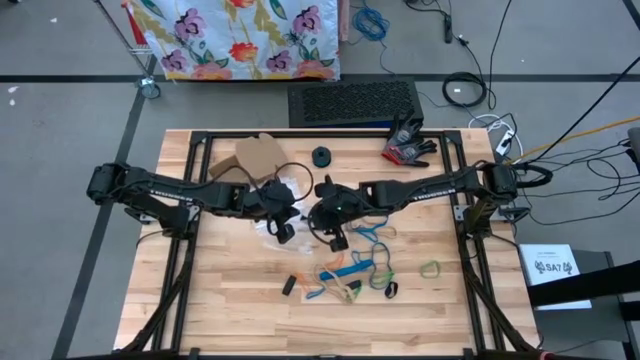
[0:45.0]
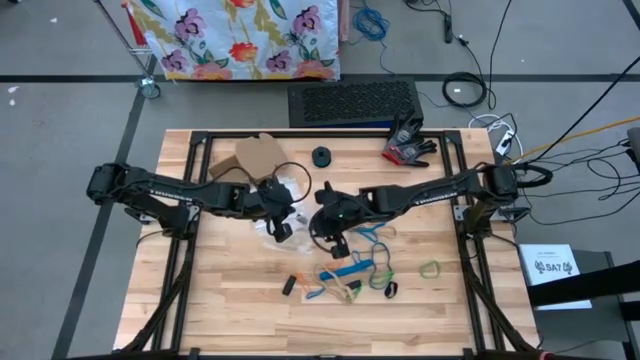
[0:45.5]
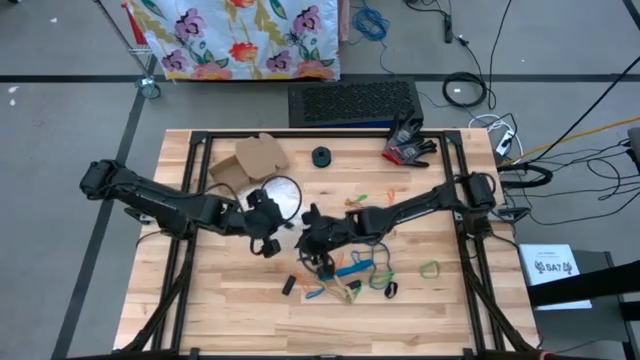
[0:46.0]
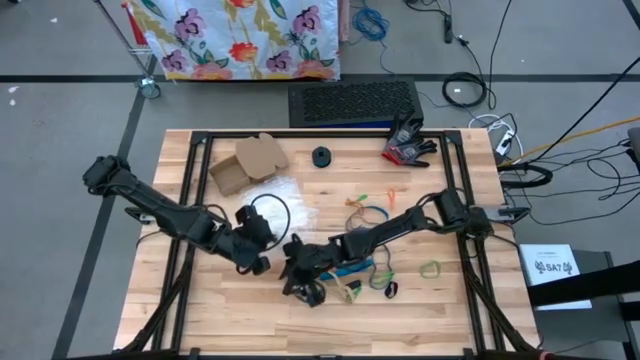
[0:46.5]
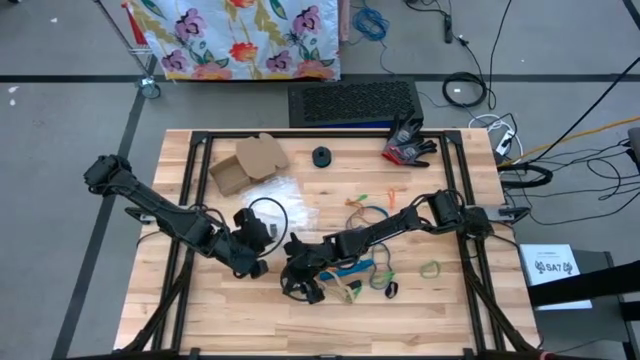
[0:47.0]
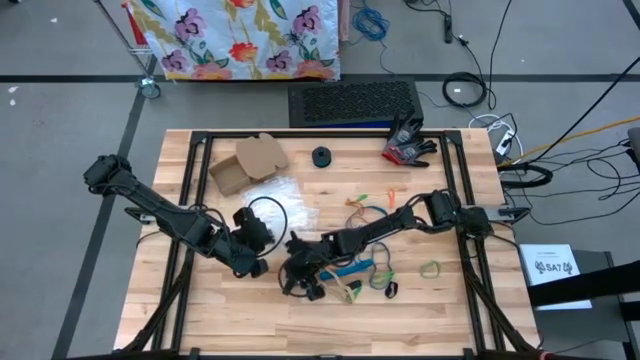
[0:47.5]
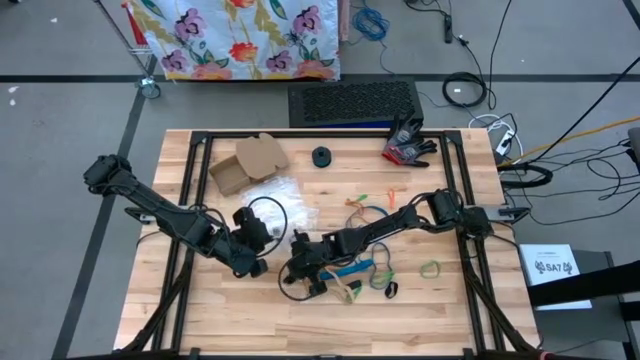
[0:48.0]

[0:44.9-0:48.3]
Task: Sort rubber bands
Put the black rubber band into the transparent zip bag

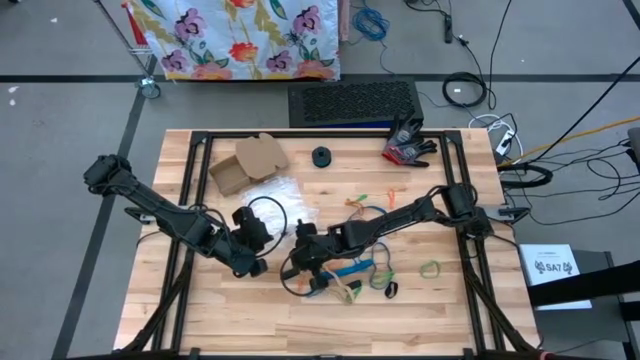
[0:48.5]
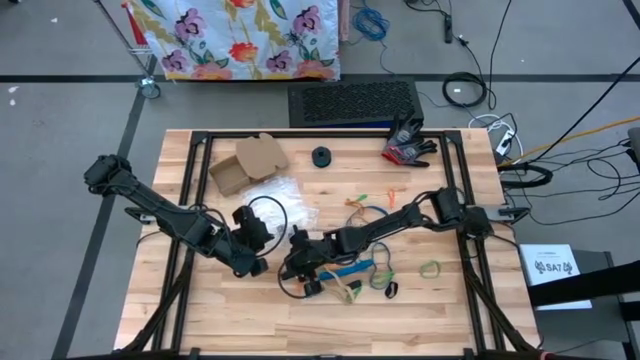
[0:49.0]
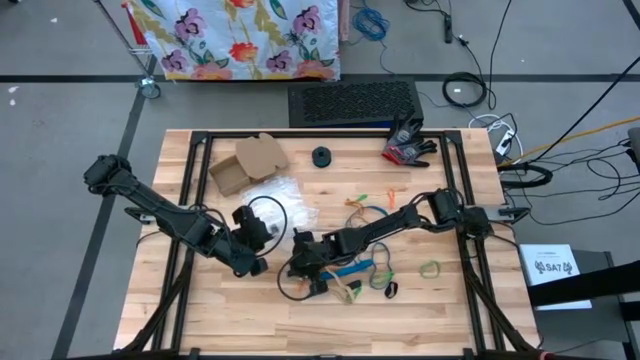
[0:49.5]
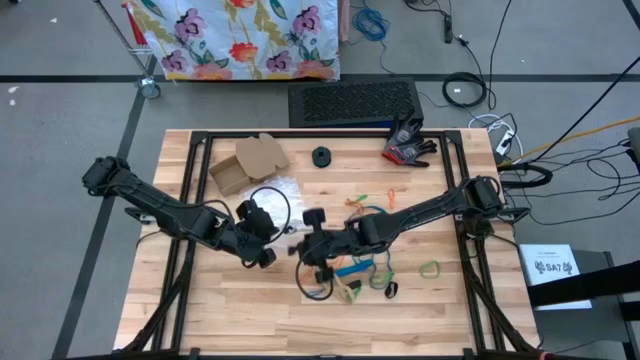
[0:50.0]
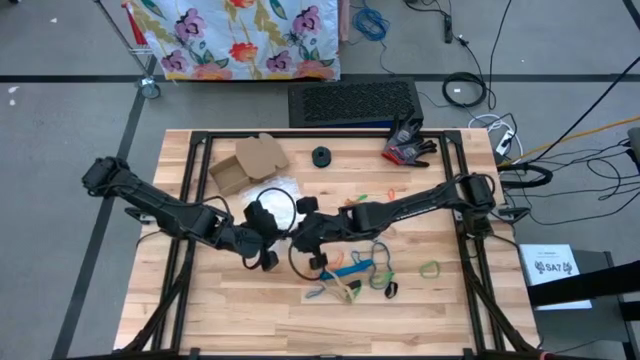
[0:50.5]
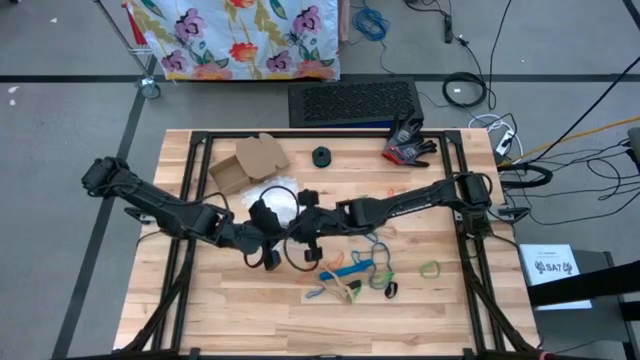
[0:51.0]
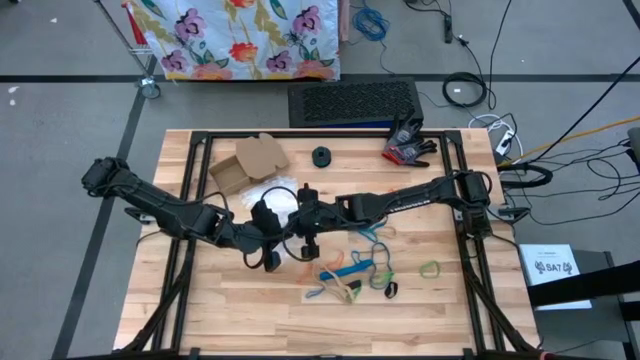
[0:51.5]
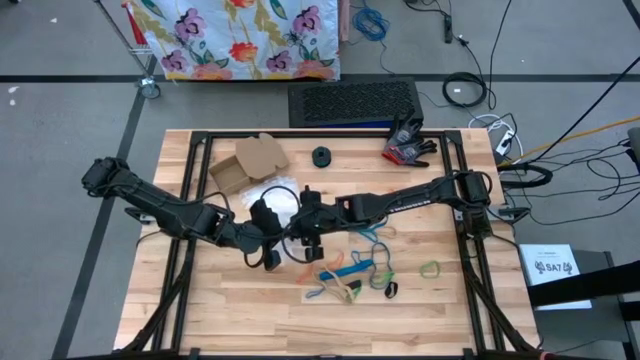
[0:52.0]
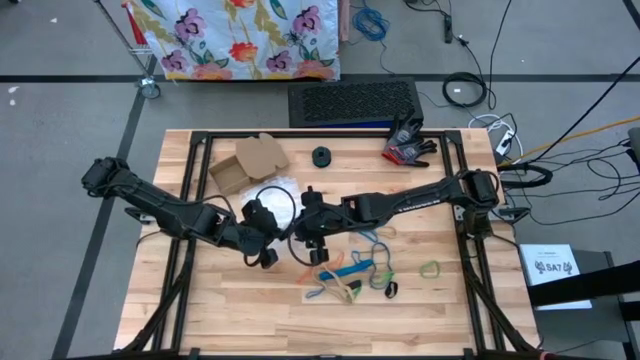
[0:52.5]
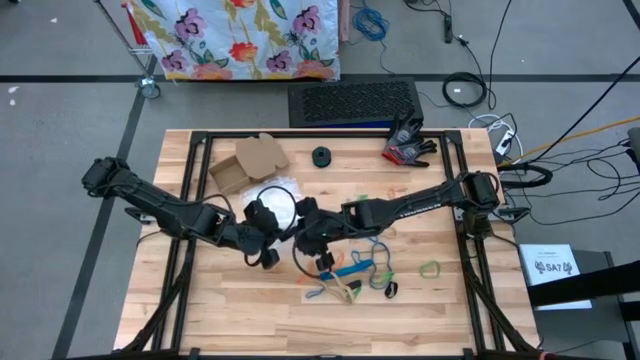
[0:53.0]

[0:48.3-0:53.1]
Put the black rubber band into the transparent zip bag

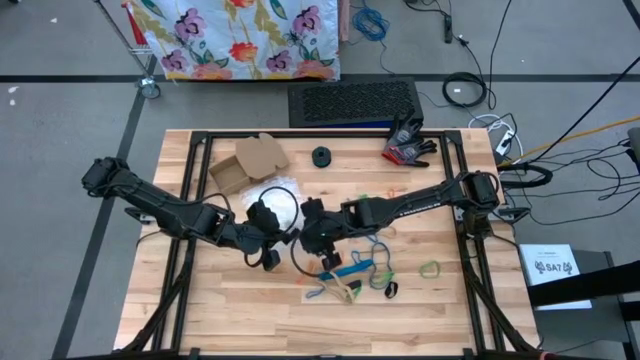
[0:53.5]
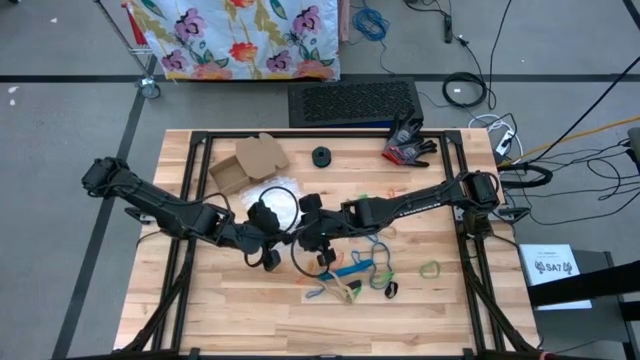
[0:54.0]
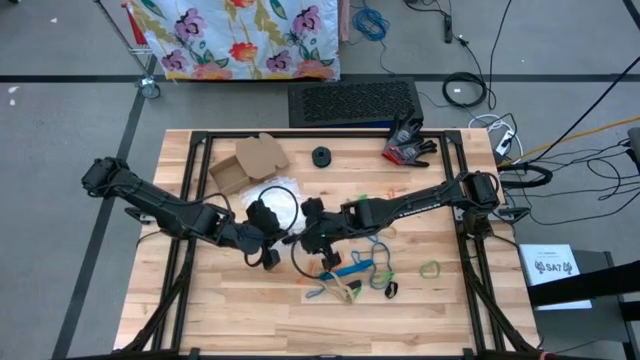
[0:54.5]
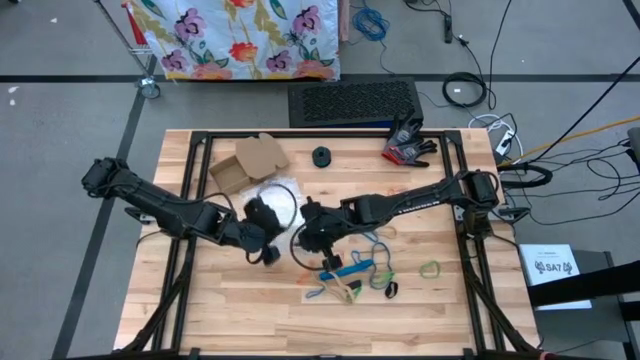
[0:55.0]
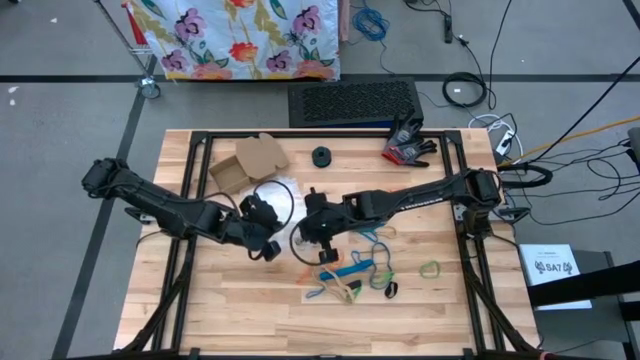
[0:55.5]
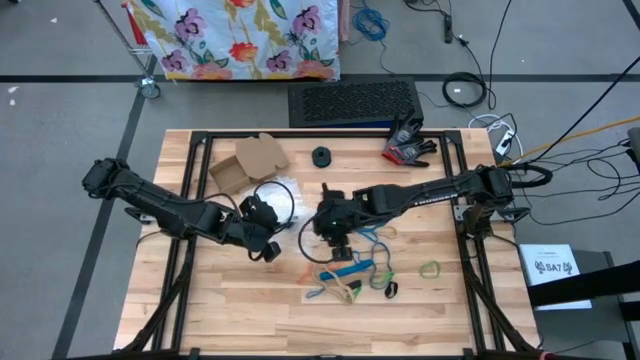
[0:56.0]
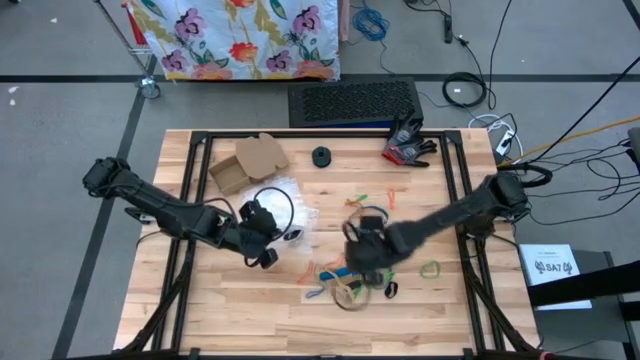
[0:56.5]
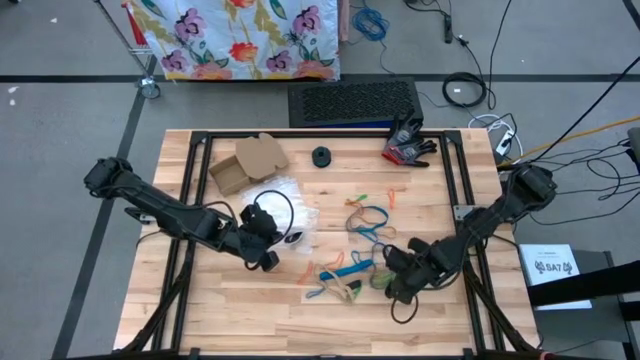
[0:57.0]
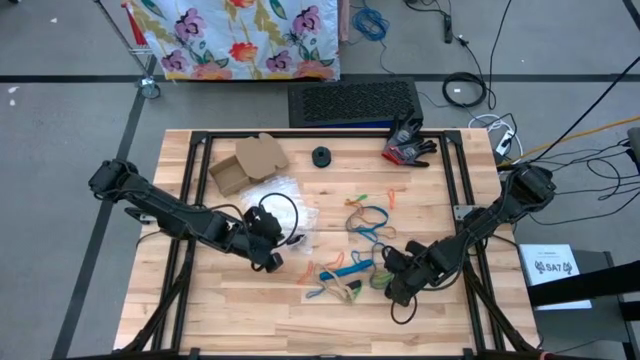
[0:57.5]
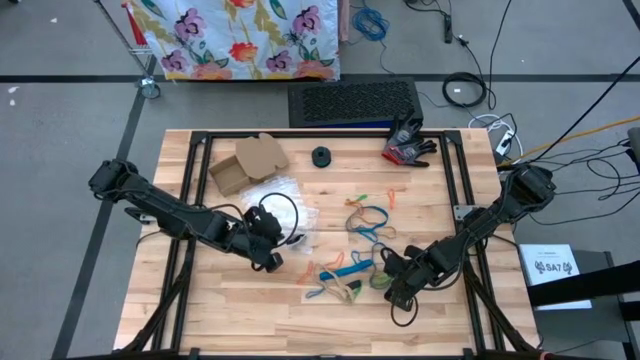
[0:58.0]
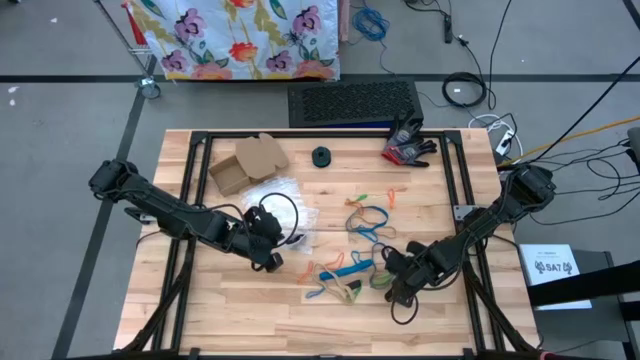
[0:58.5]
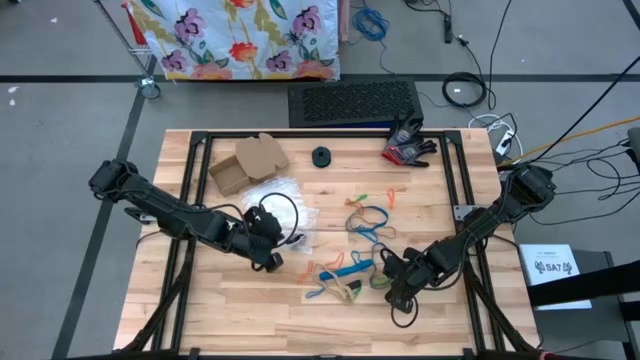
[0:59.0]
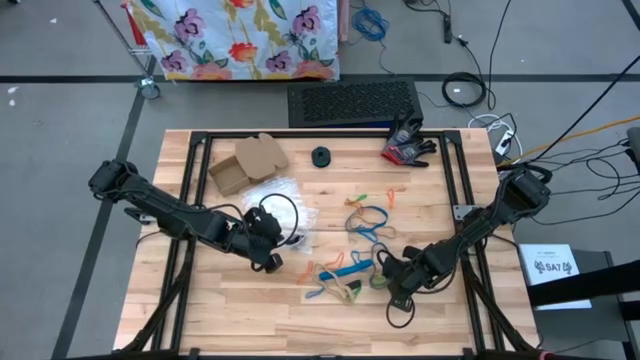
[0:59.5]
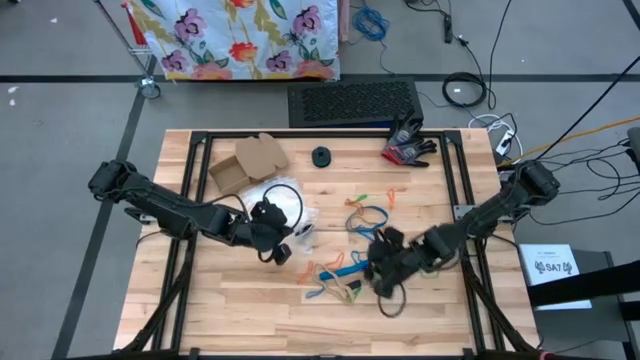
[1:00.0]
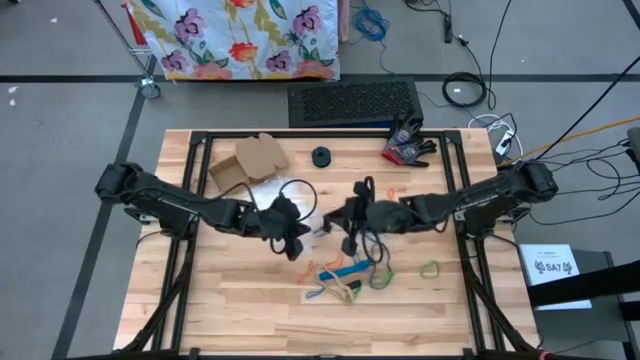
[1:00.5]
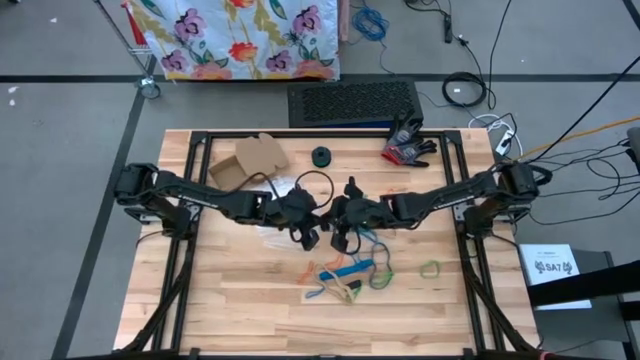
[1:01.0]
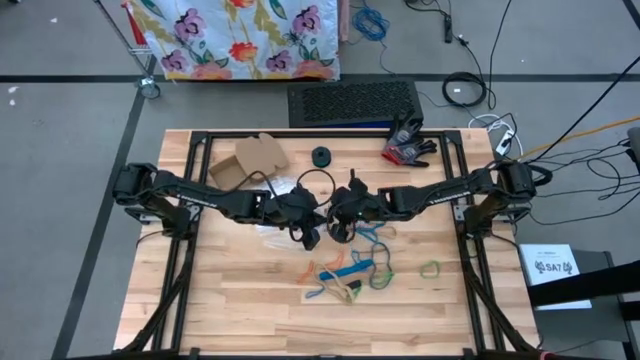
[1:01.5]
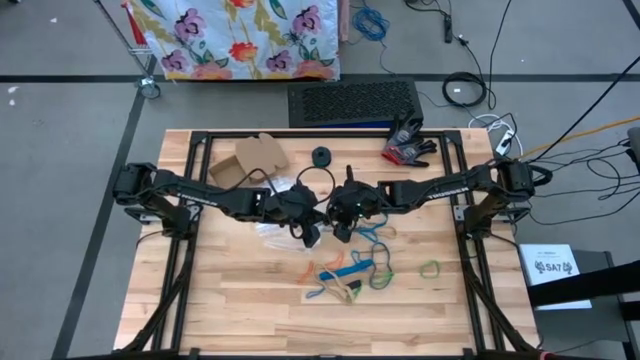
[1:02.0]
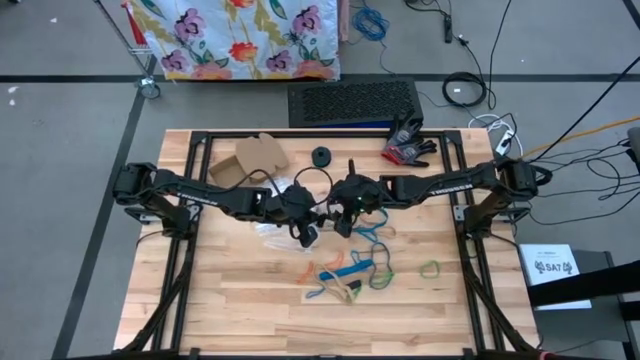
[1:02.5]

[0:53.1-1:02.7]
Put the black rubber band into the transparent zip bag

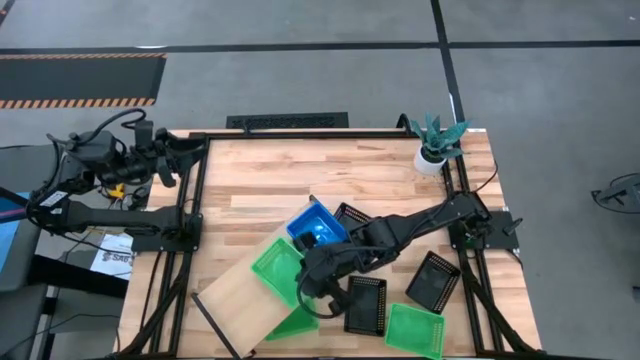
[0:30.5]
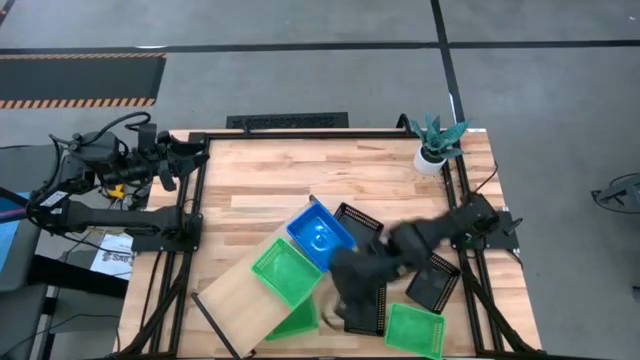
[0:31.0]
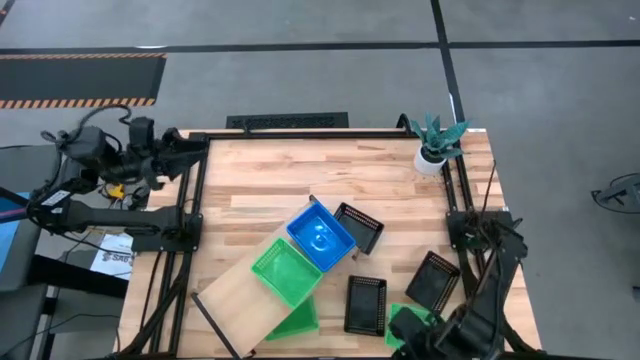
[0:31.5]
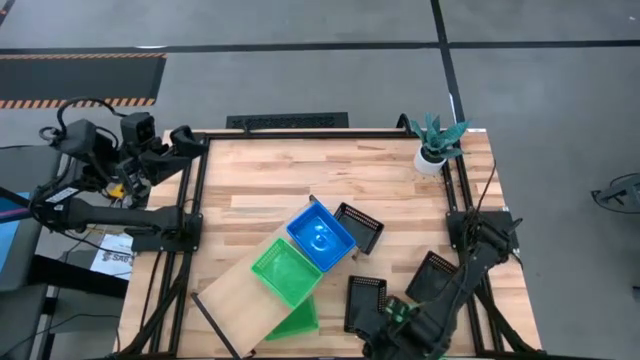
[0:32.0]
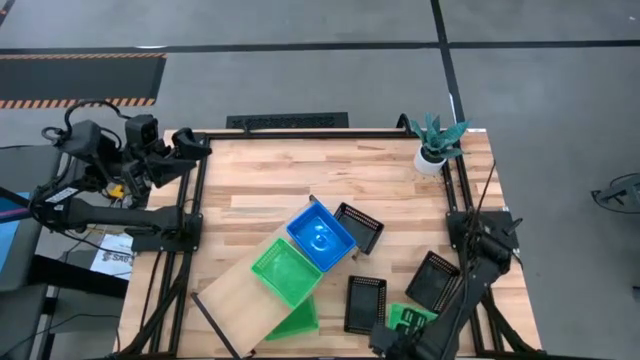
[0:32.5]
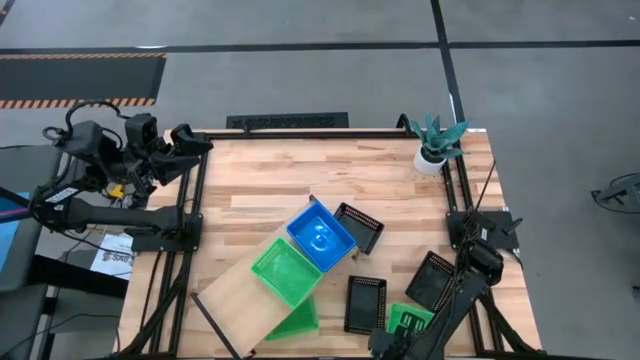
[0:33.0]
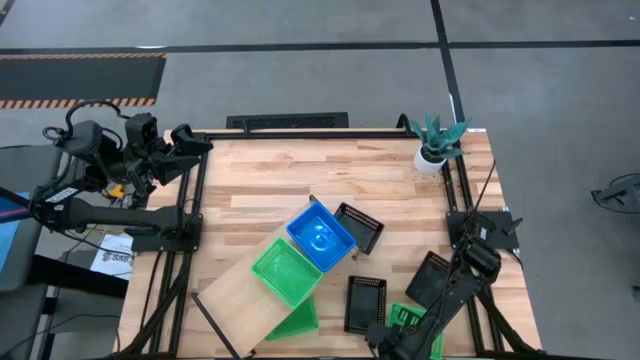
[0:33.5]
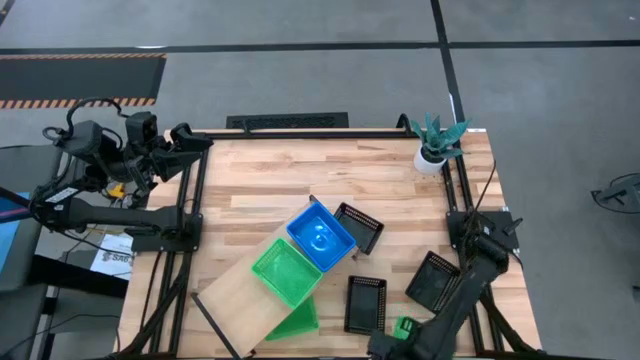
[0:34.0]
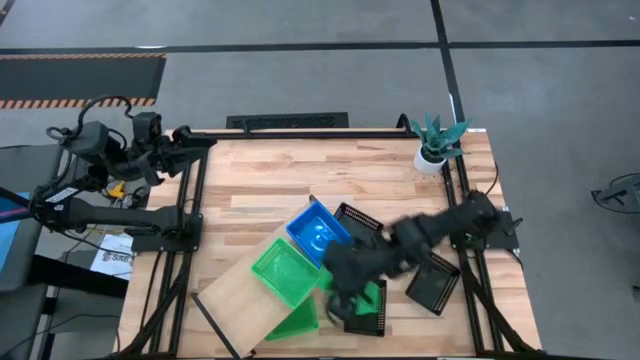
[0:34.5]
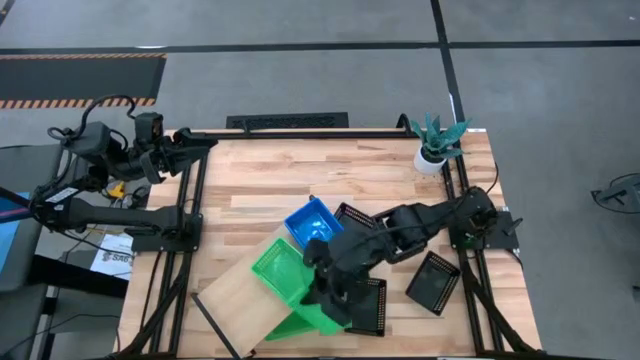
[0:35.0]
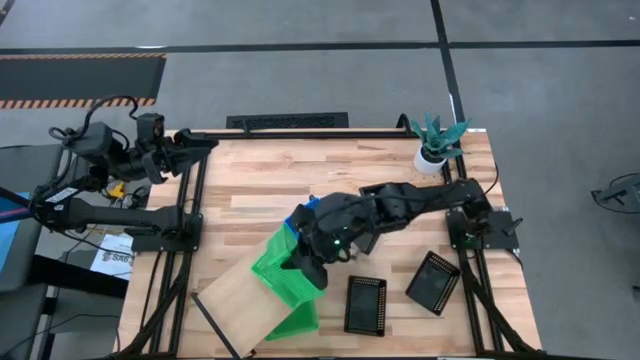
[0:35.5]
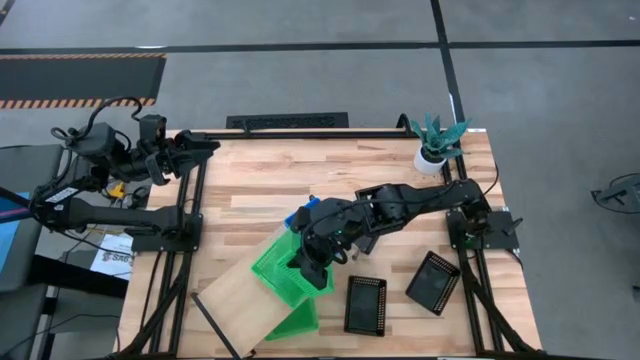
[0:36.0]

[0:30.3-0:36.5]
Task: Stack baskets on shelf by color
Stack the right green bin on the green bin on the shelf
